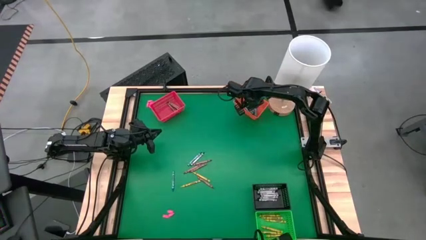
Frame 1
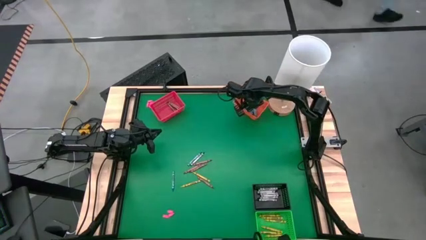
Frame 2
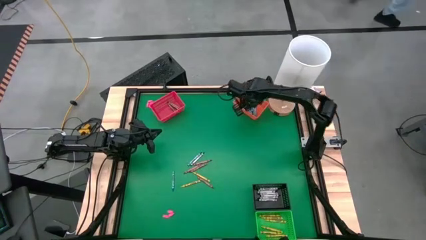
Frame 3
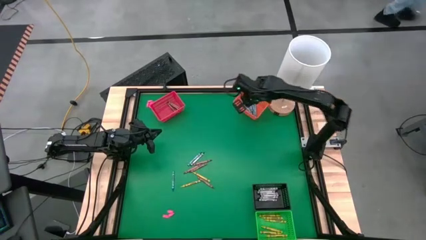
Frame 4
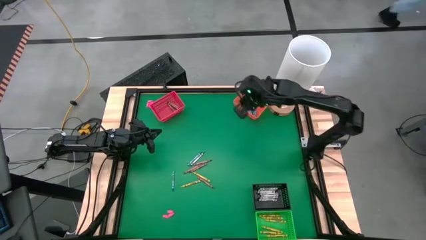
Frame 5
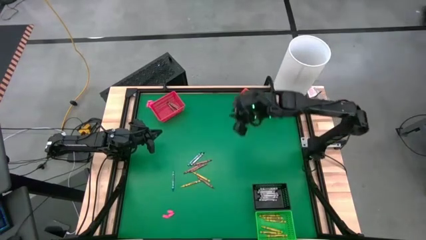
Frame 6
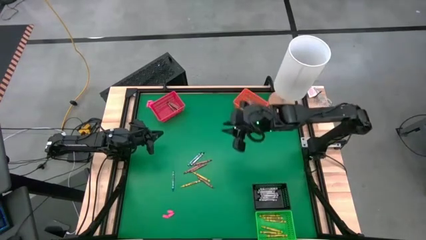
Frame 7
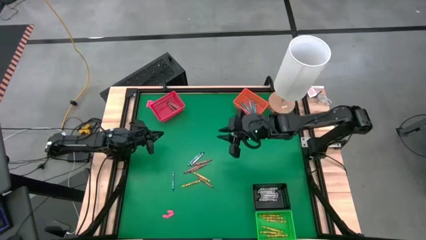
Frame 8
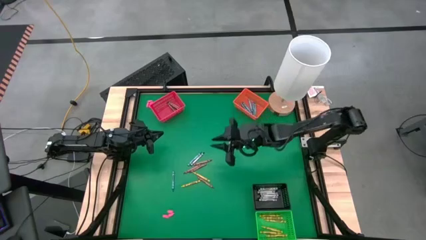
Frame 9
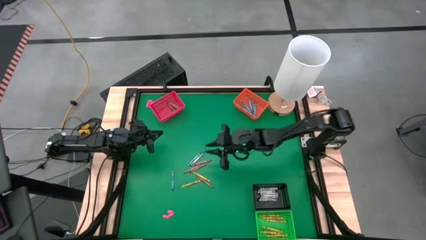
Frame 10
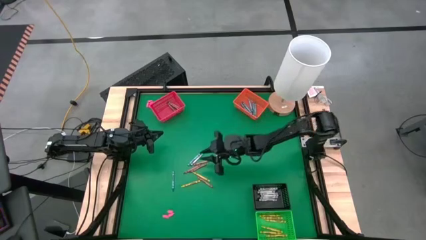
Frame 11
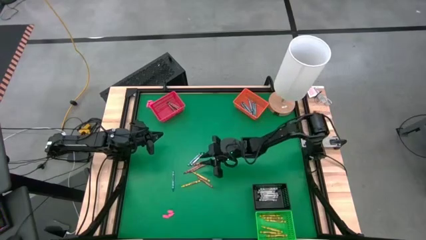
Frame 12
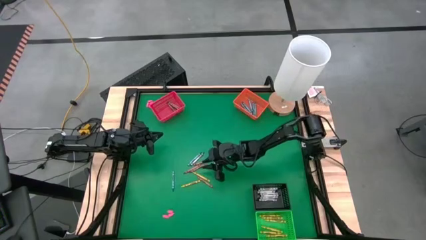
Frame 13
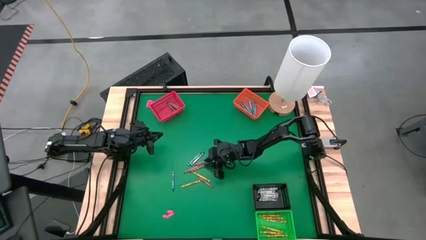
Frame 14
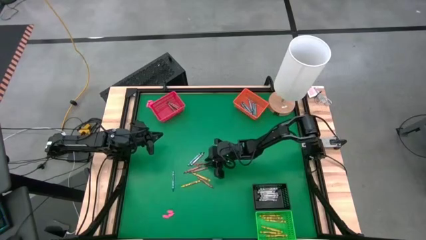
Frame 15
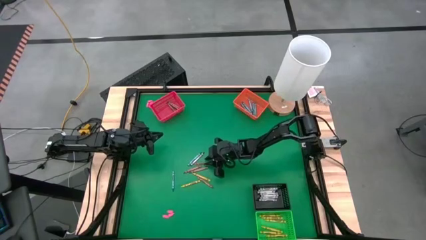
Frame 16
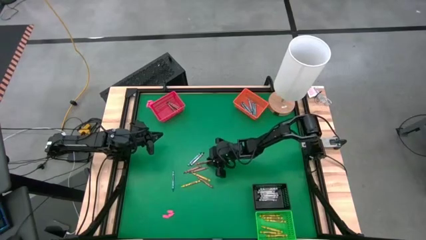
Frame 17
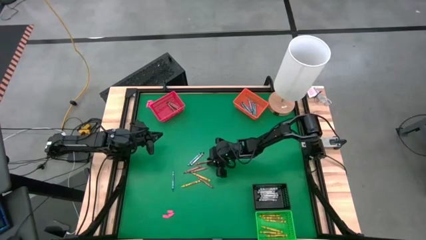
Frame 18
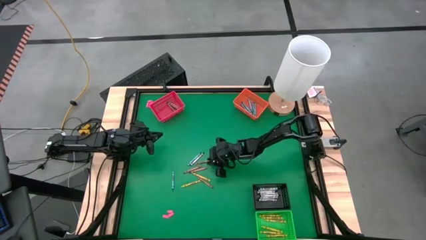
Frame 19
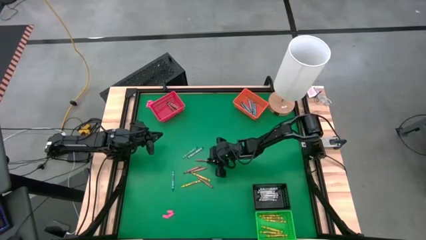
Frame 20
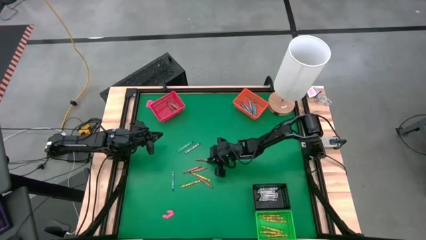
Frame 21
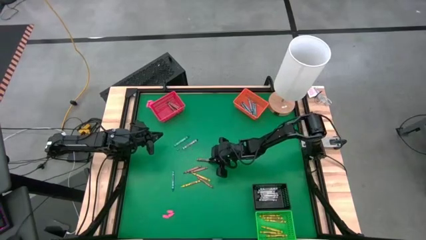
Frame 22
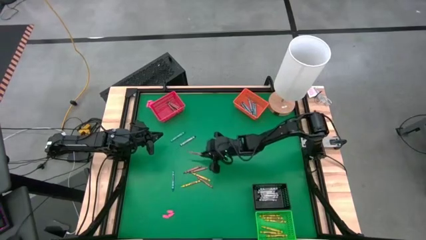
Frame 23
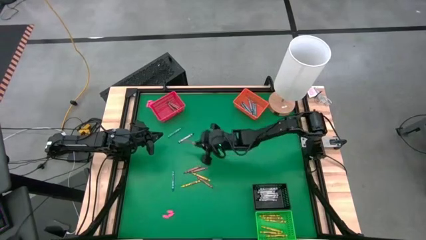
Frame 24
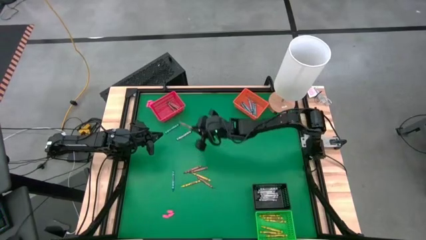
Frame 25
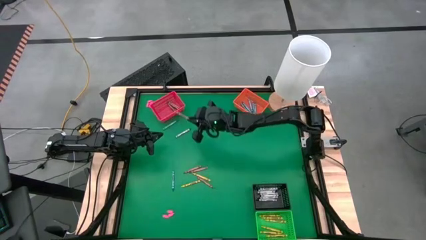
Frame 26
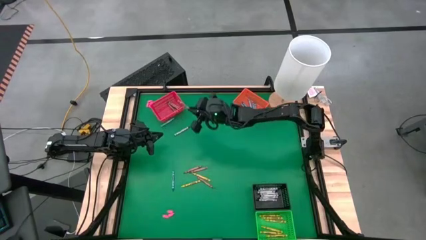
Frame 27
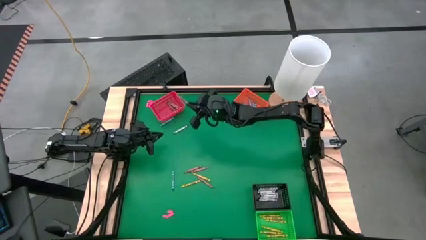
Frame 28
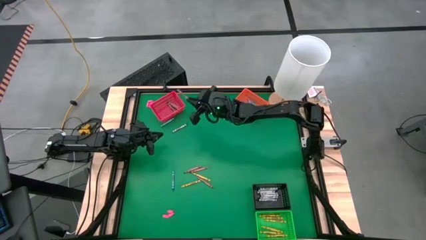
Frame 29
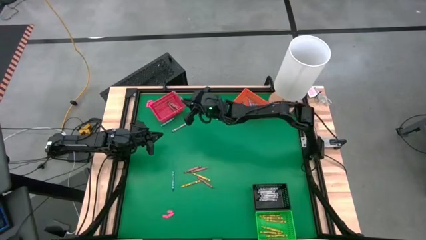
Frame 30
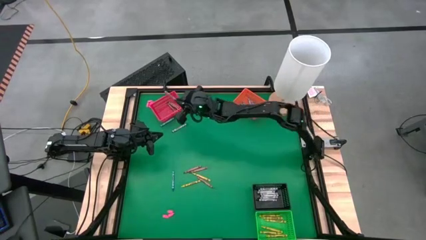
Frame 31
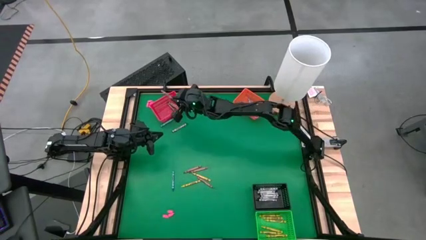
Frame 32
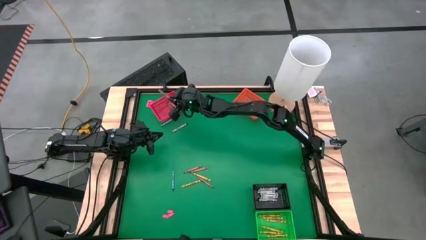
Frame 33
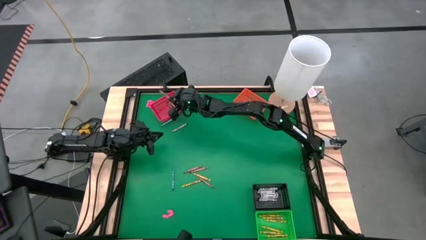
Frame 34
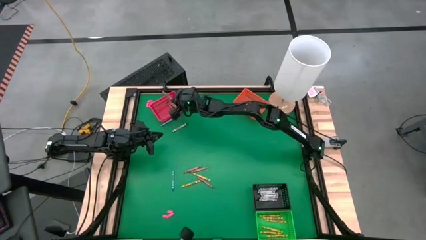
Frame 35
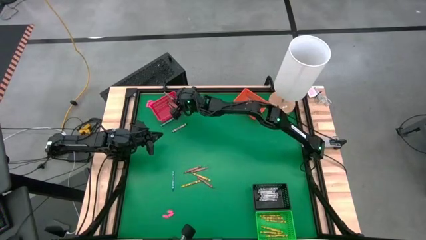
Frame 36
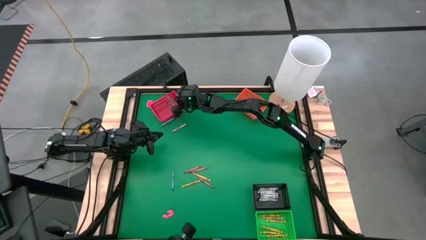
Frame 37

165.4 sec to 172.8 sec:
Task: Sort crayons
Put the brown crayon into the red bin

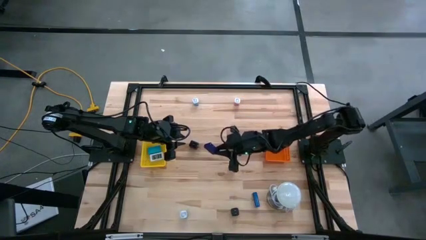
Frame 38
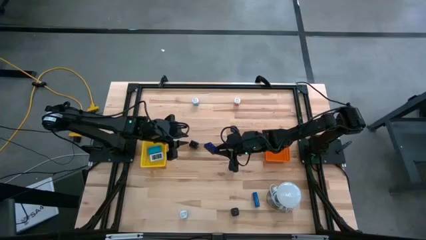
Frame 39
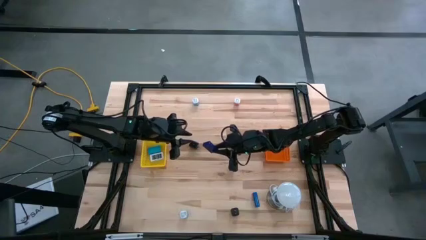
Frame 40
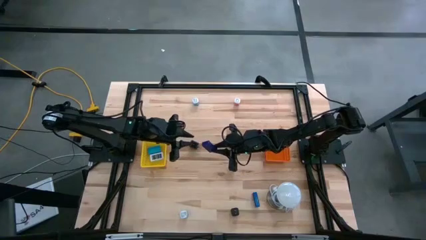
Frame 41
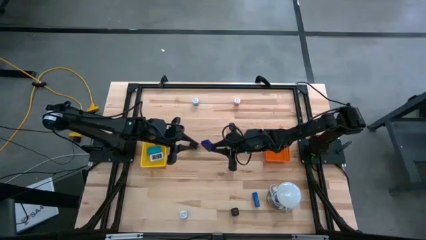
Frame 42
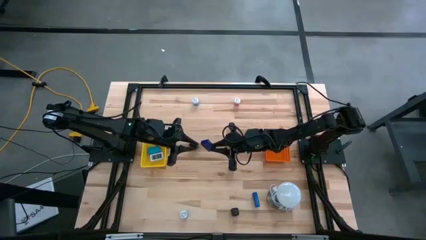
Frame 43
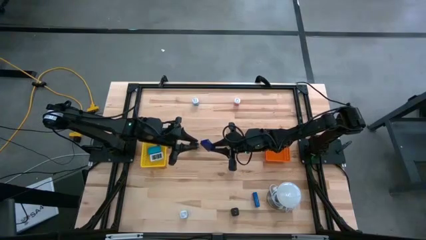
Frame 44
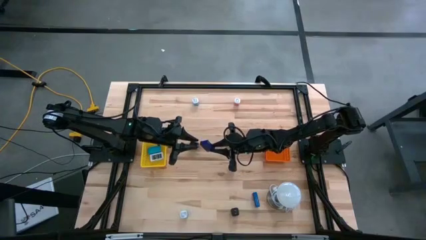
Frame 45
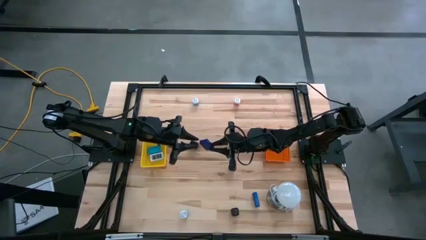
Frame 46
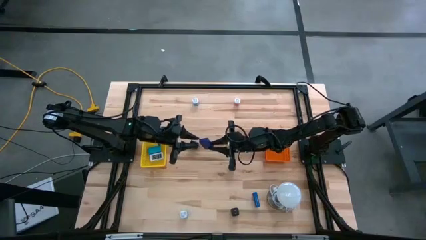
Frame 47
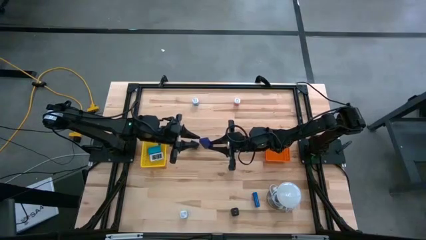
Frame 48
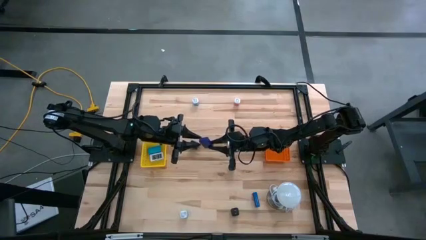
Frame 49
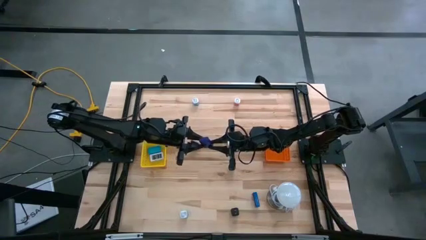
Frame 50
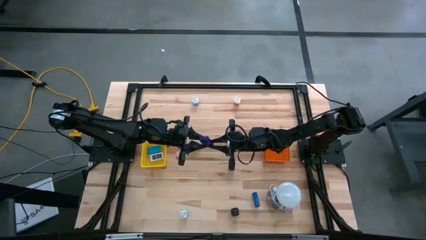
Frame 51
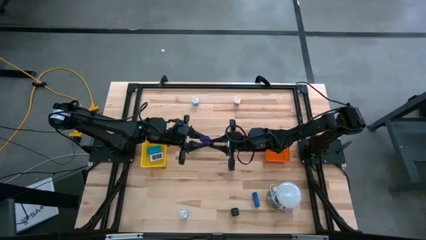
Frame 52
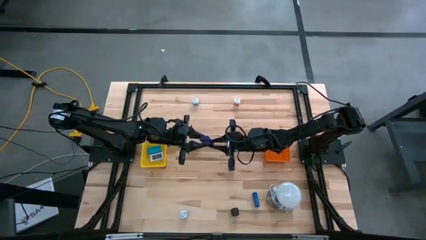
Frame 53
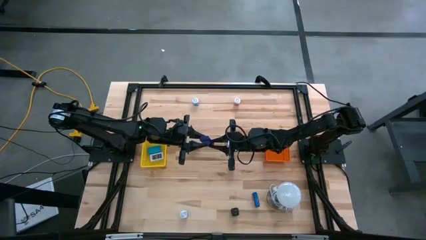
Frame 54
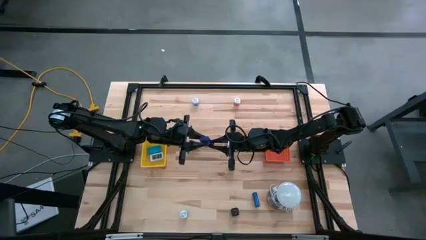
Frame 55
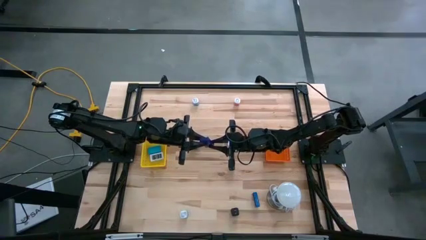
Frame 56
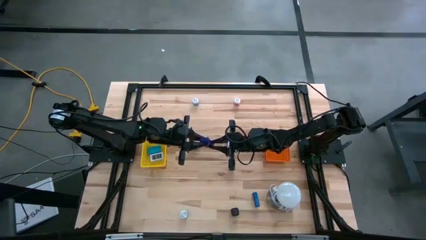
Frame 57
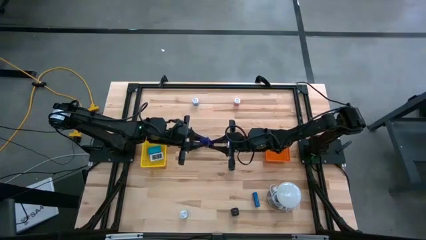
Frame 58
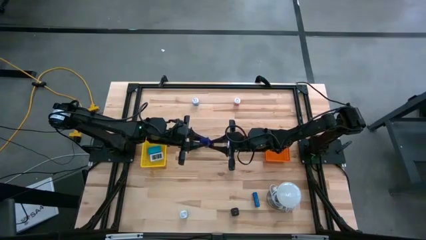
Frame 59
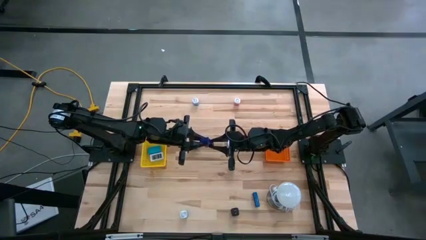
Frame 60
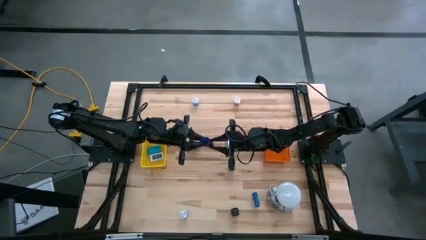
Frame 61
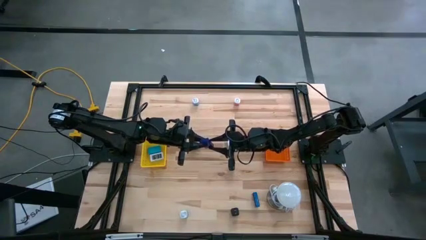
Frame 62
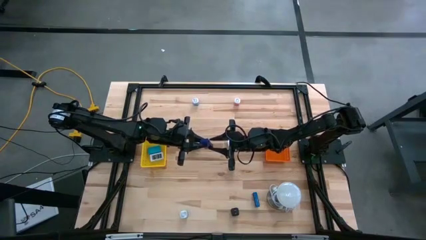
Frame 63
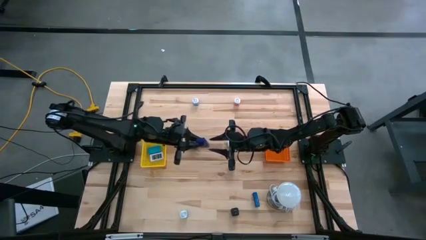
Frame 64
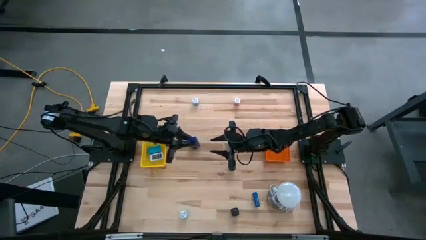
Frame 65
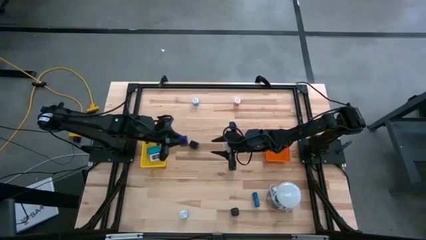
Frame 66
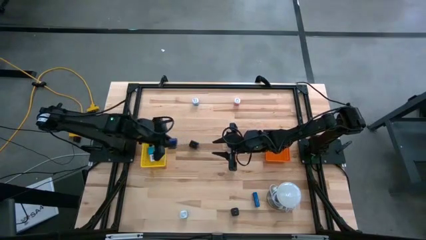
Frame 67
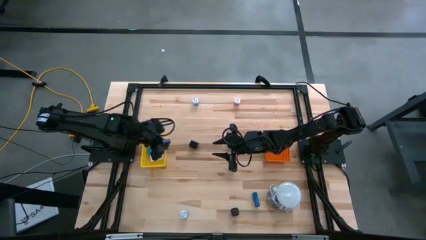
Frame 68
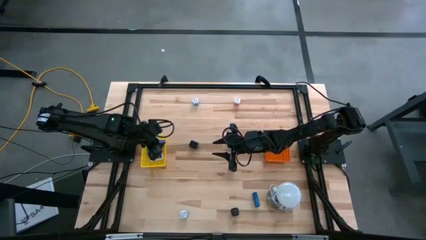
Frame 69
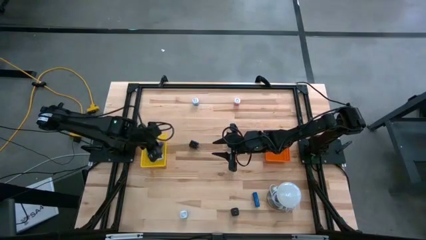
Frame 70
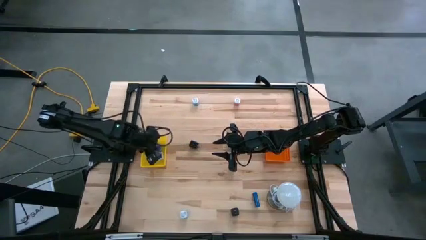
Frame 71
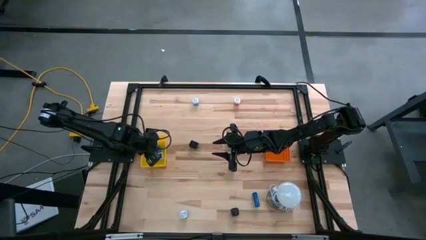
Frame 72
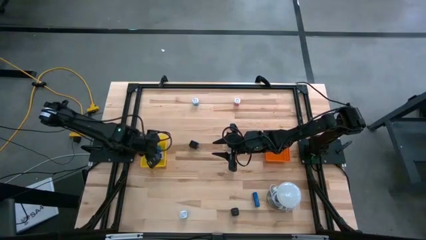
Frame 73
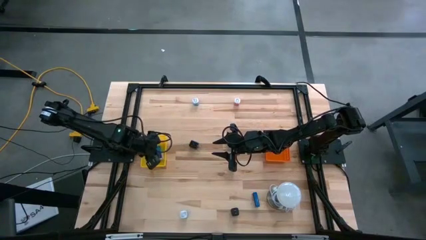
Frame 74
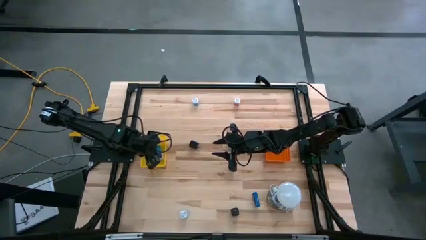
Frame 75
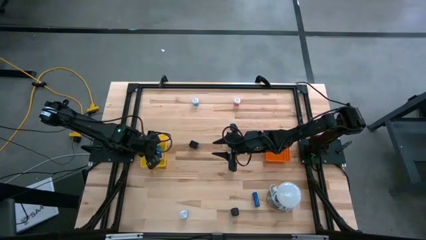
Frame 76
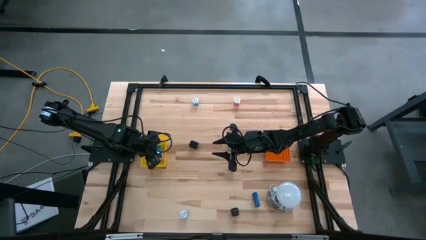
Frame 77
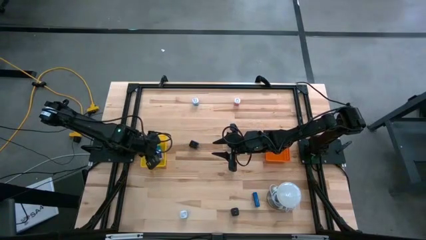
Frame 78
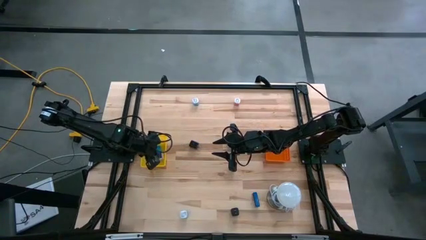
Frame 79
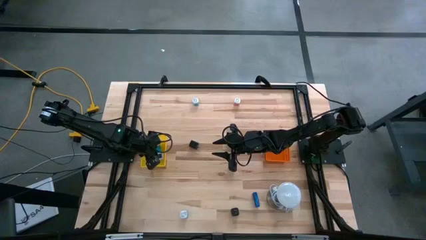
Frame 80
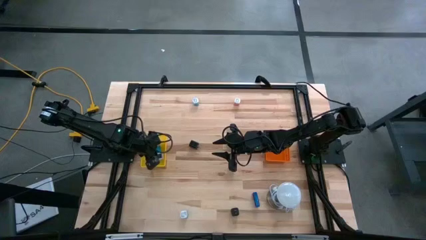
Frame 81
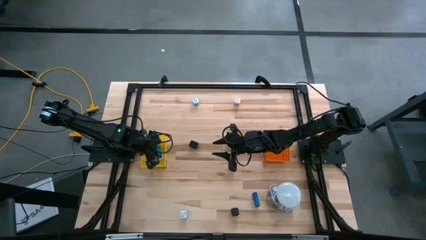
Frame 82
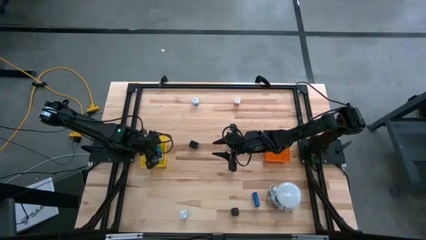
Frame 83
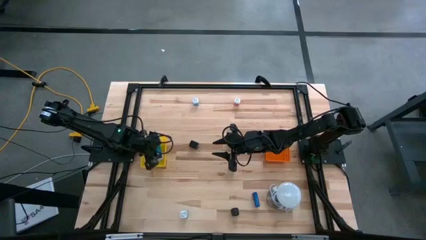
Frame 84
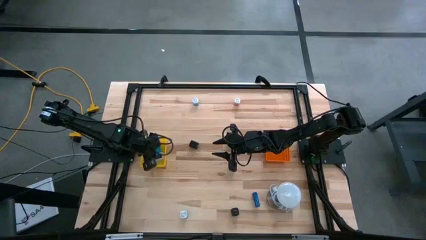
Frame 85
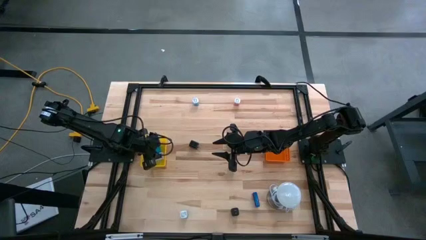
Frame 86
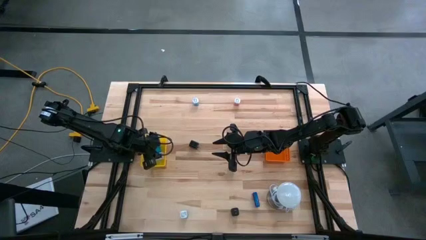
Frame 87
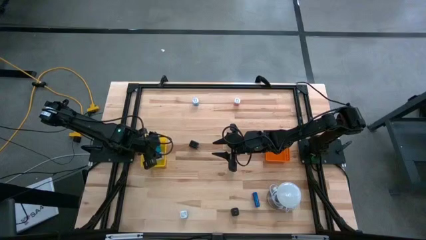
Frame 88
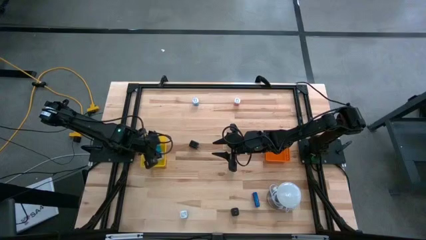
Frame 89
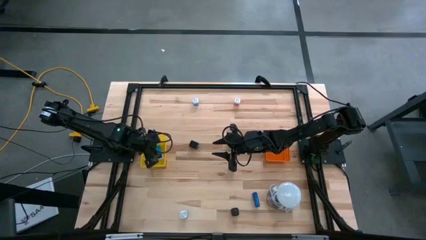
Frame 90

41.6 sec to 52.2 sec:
Task: Pick & Place Office items
Put the dark blue digital timer into the yellow bin
